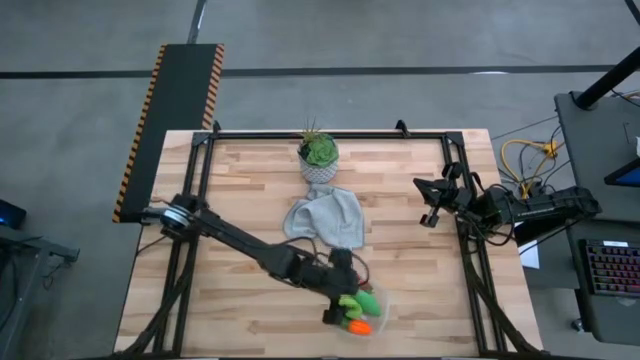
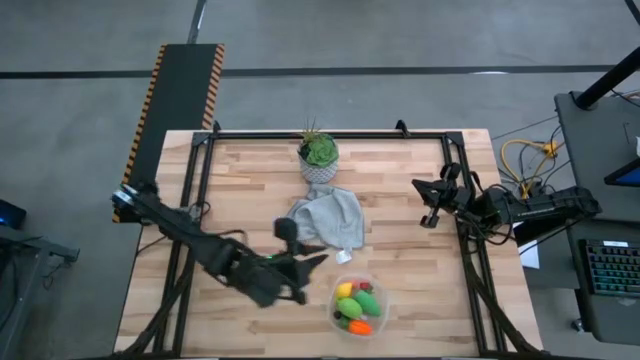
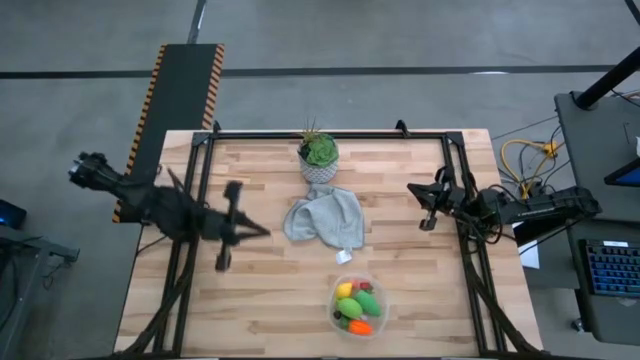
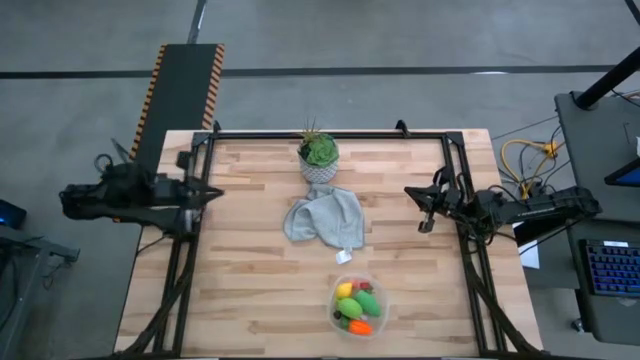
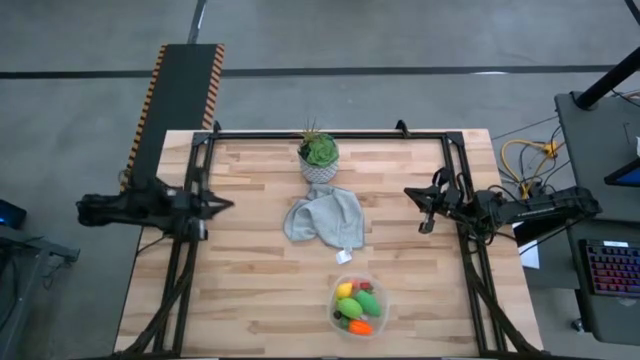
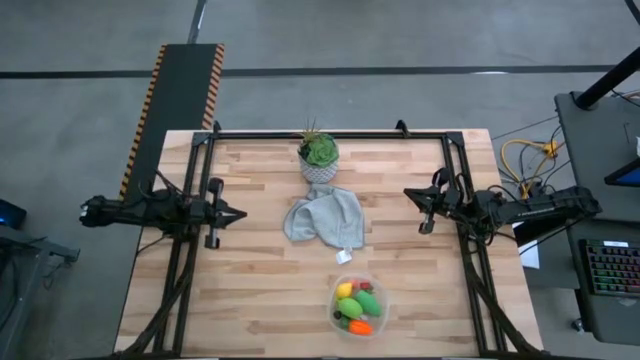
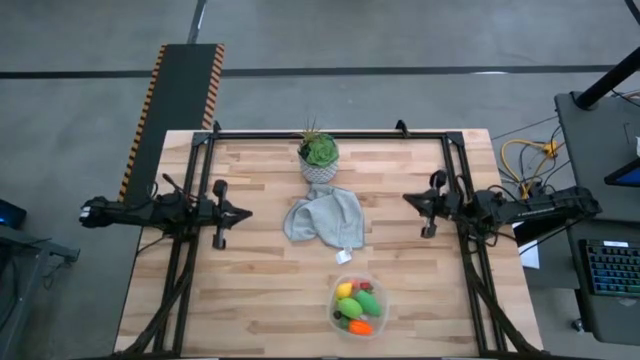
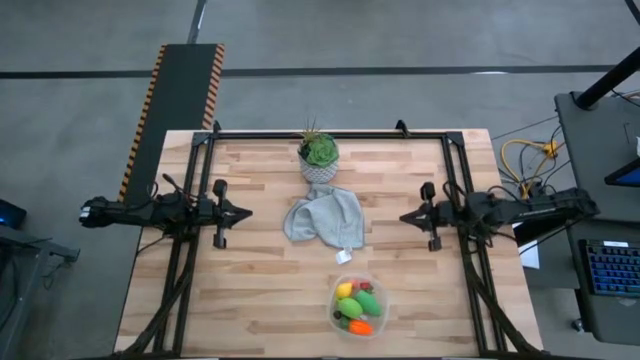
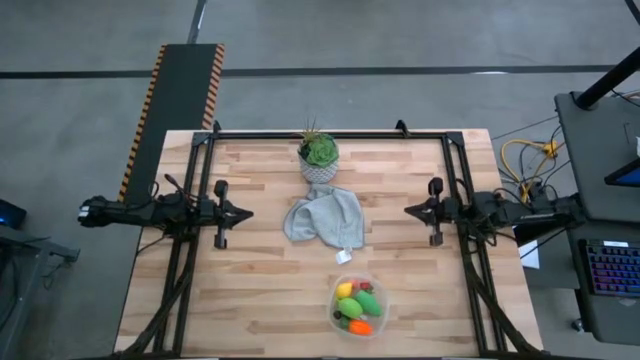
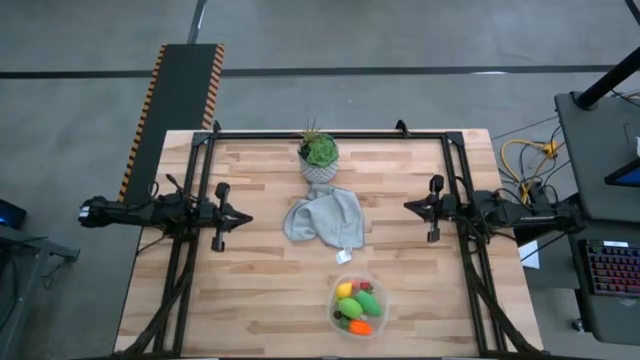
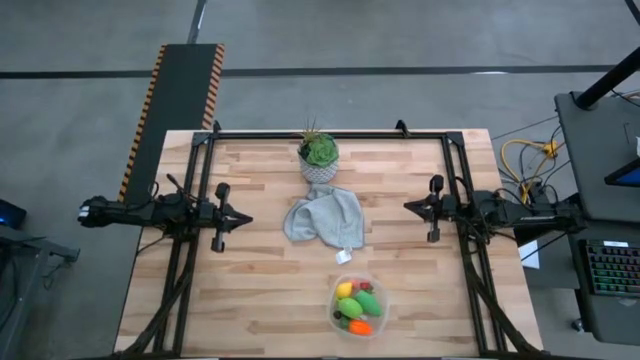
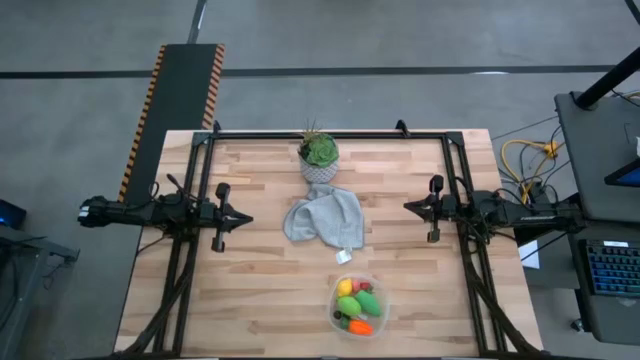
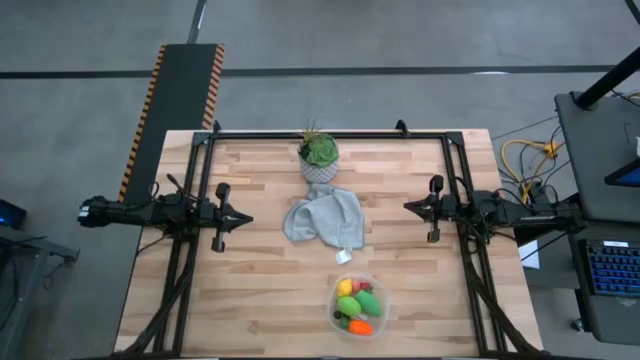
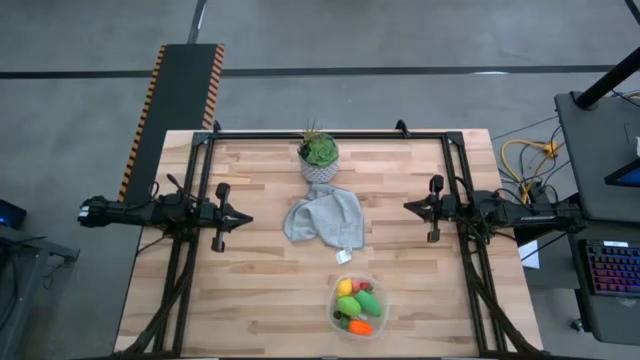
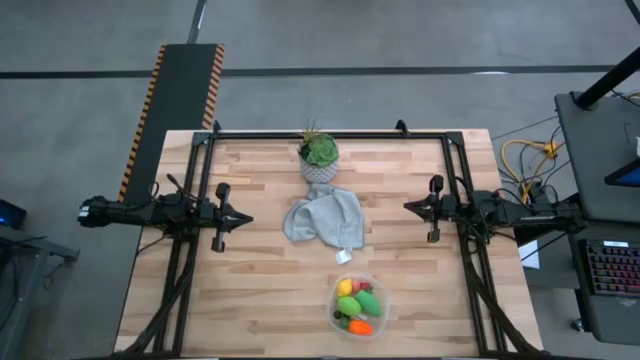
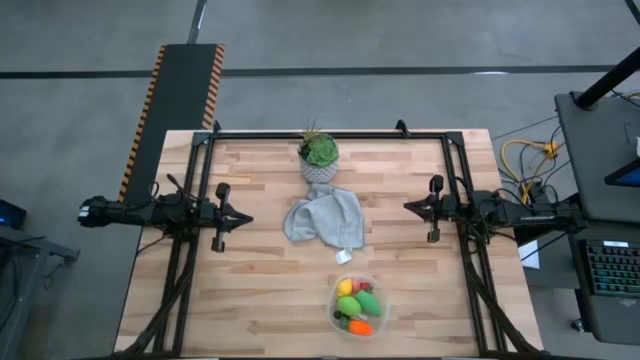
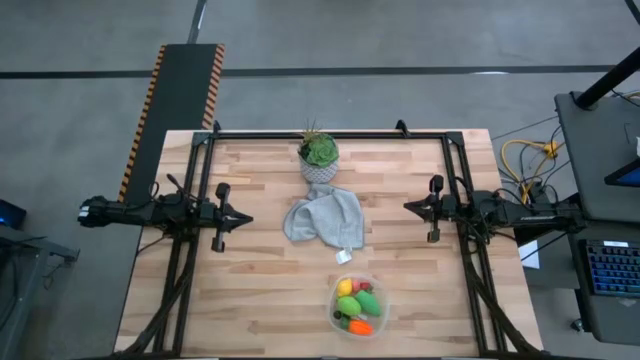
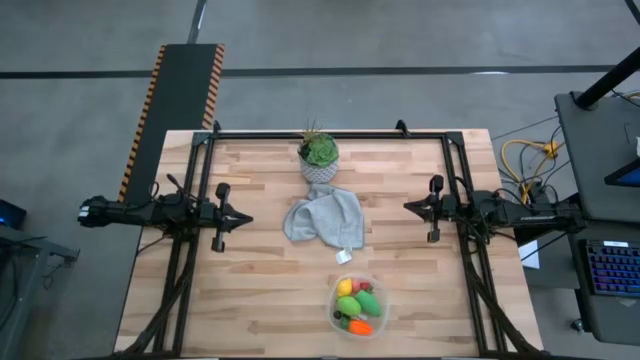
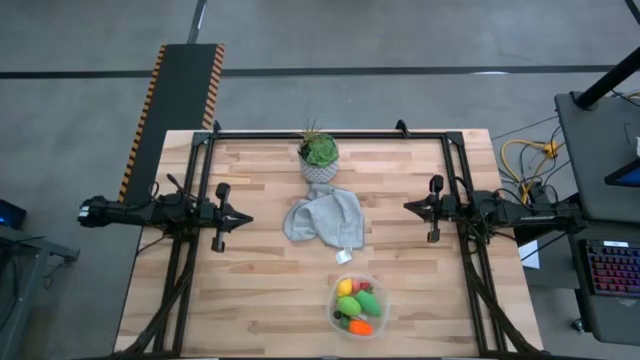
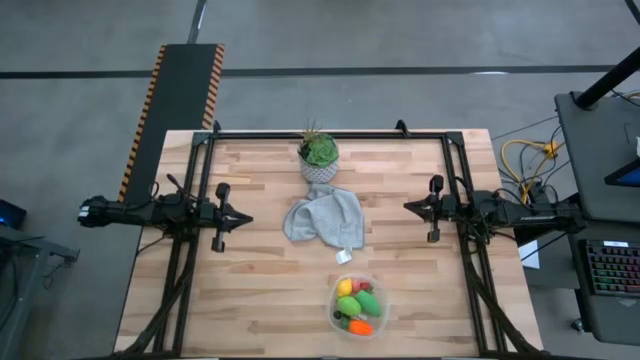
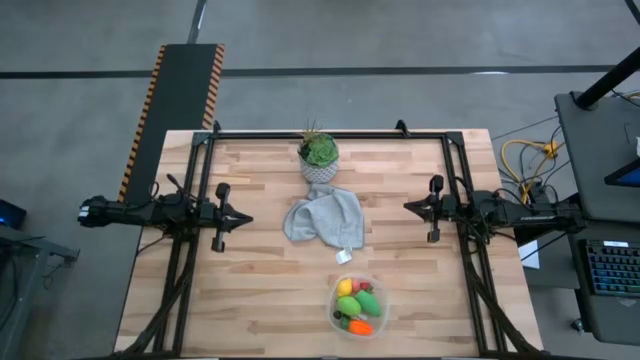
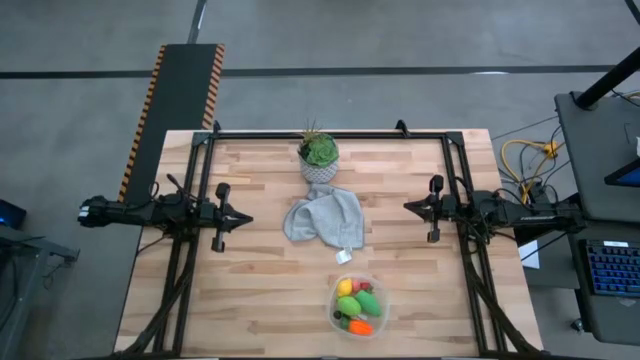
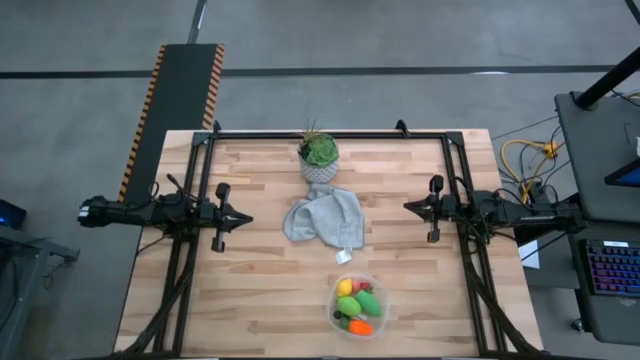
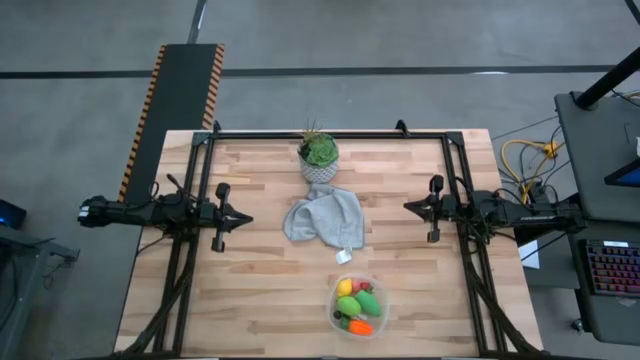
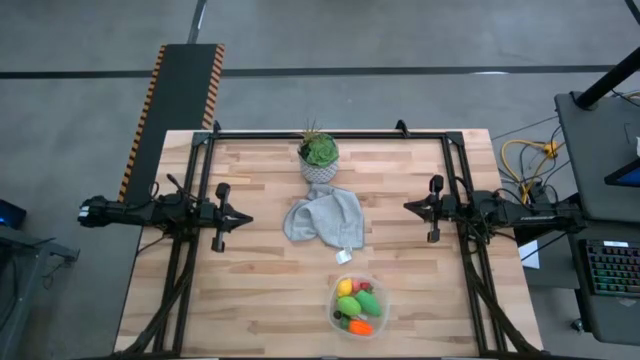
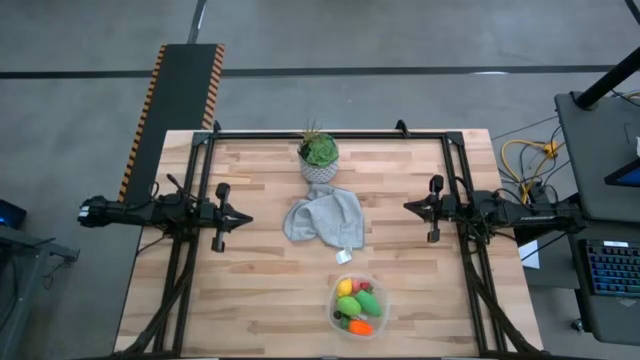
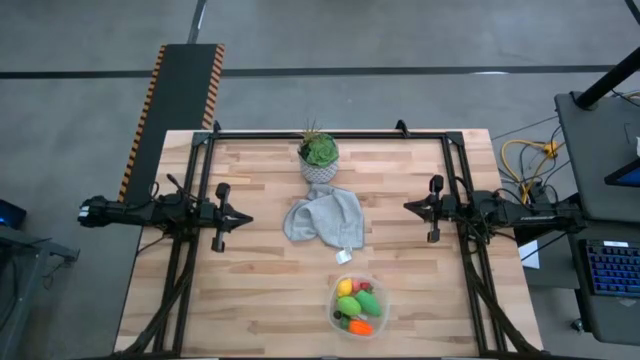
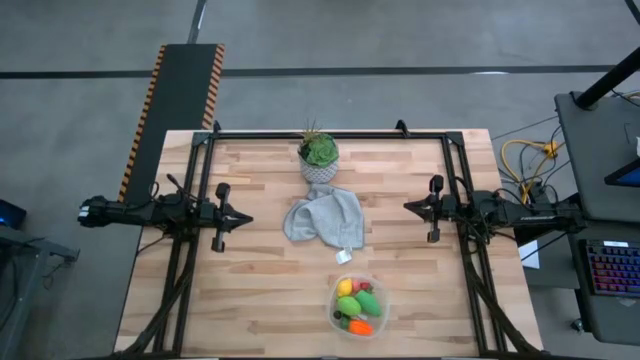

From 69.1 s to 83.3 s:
Task: Pick and placing Produce into tupperware
Return to Home Position

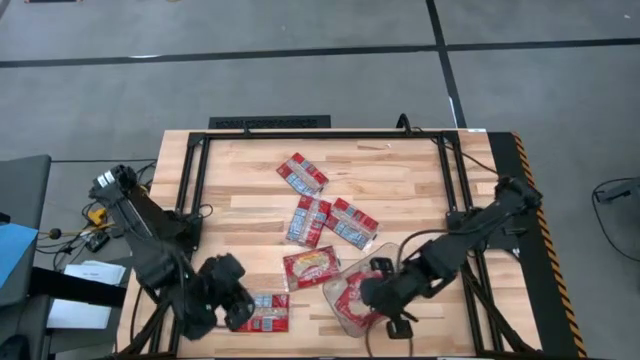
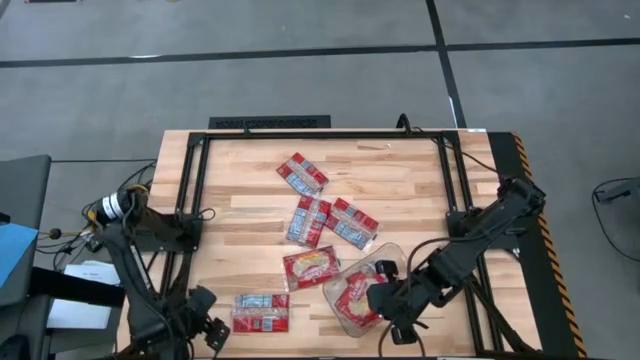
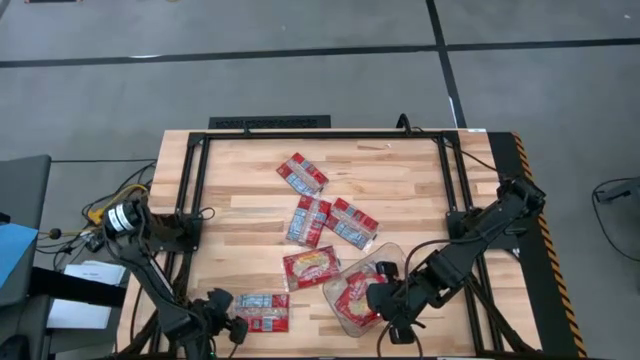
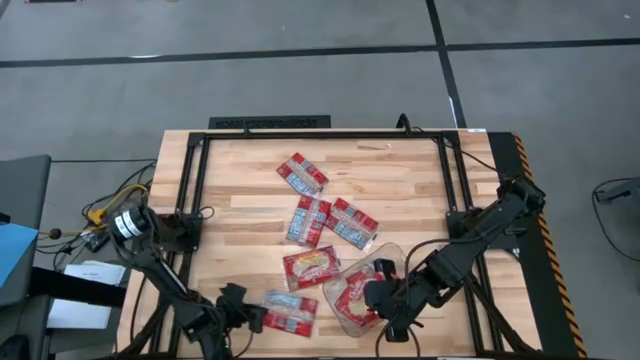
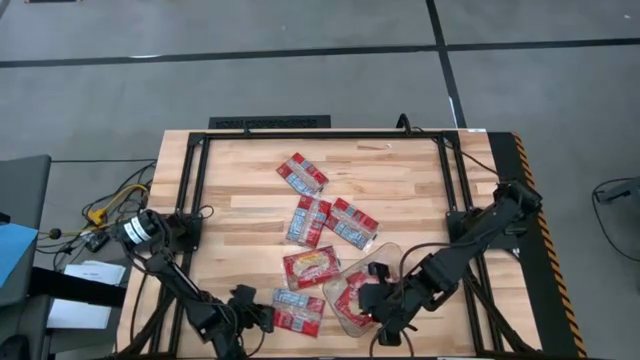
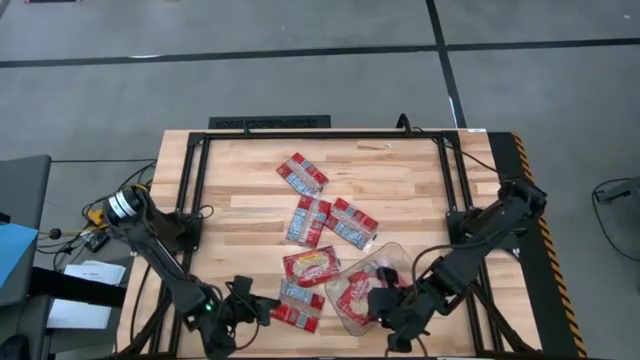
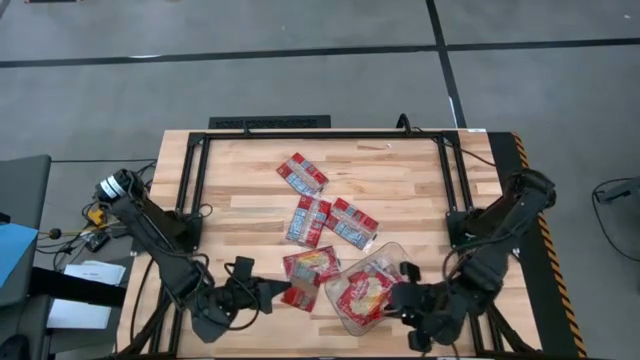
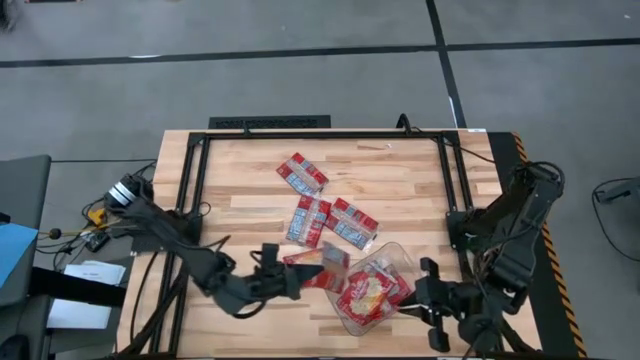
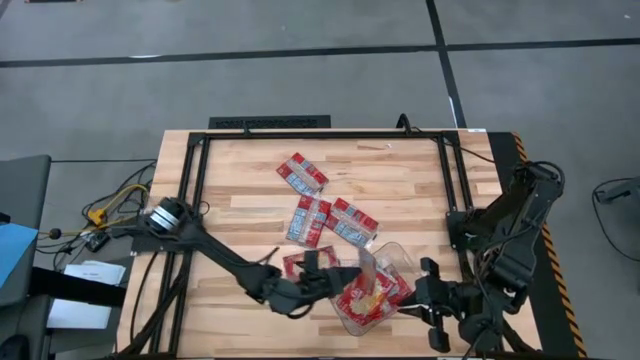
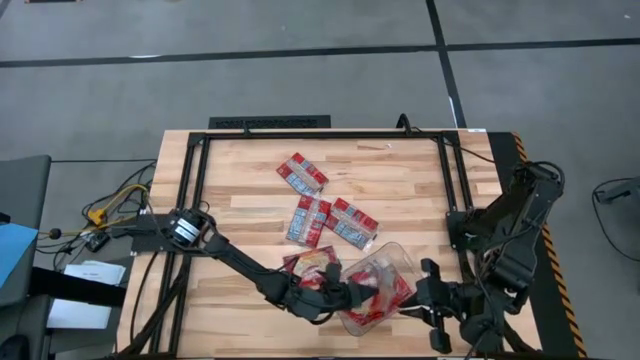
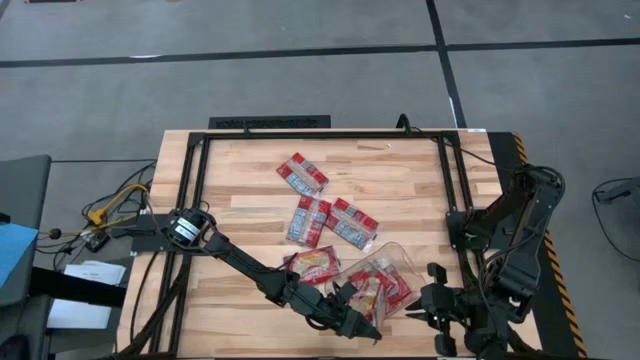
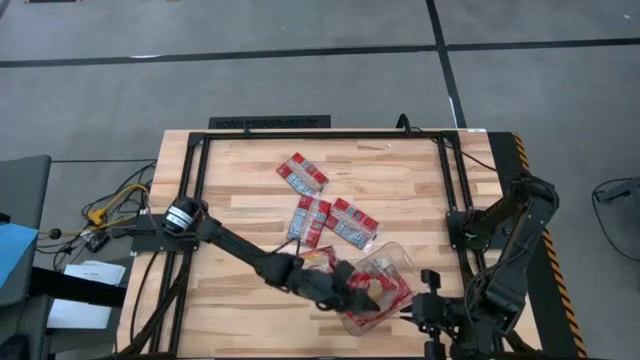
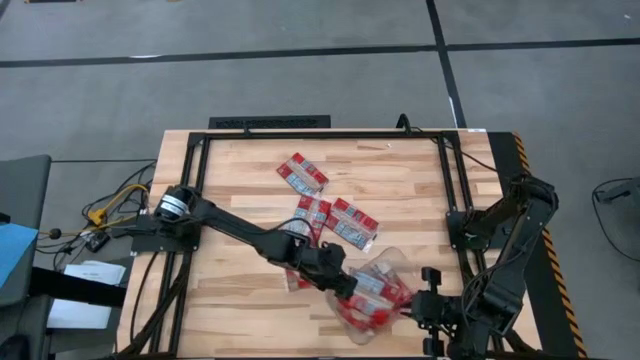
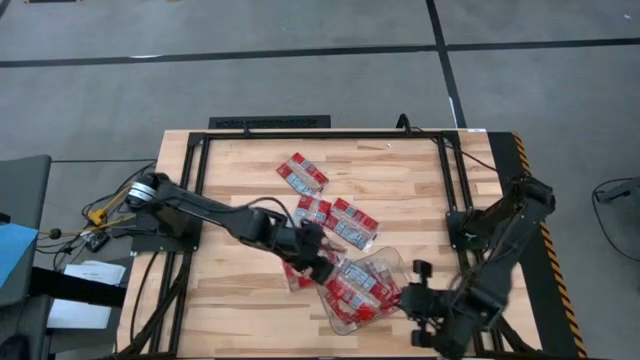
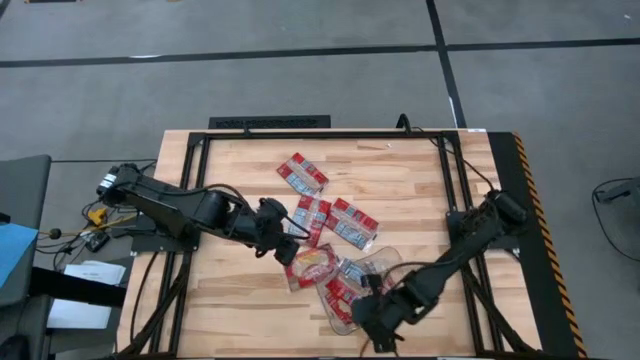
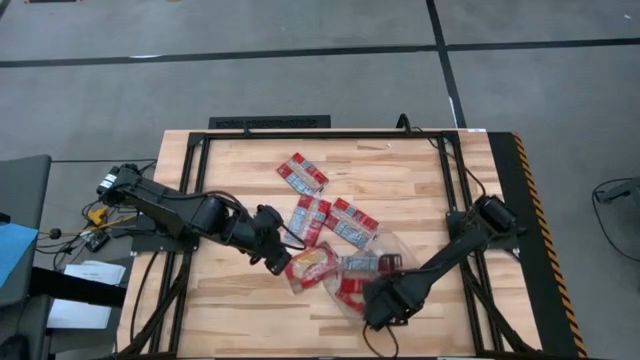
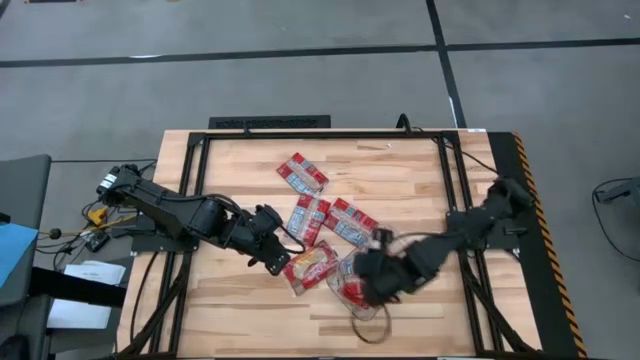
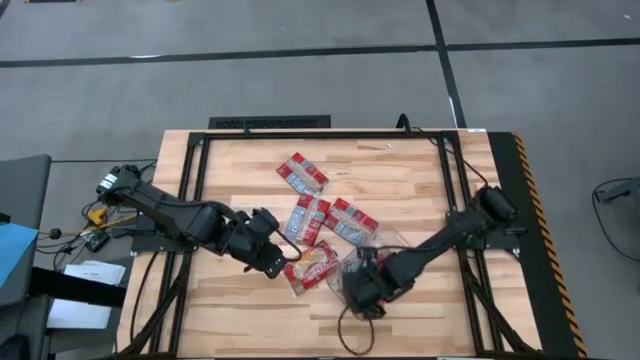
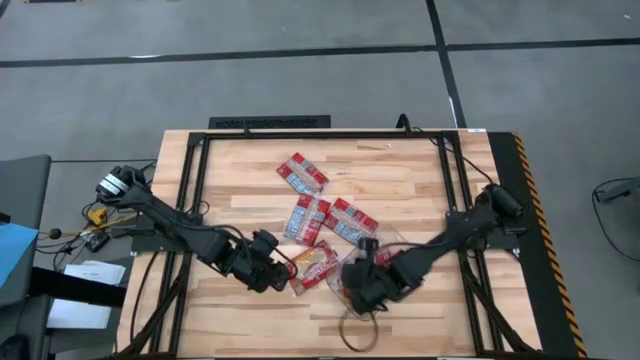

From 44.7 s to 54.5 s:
Task: Sort popcorn bags into baskets
Put the red popcorn bag into the transparent bin
